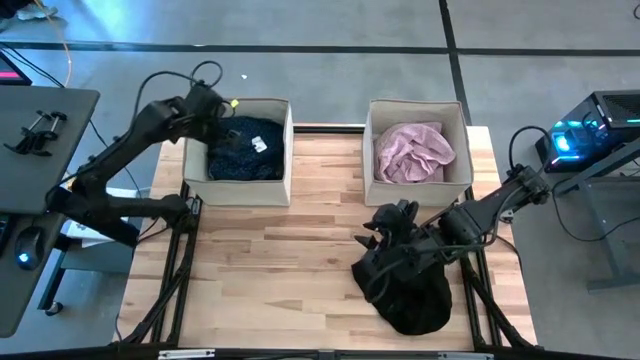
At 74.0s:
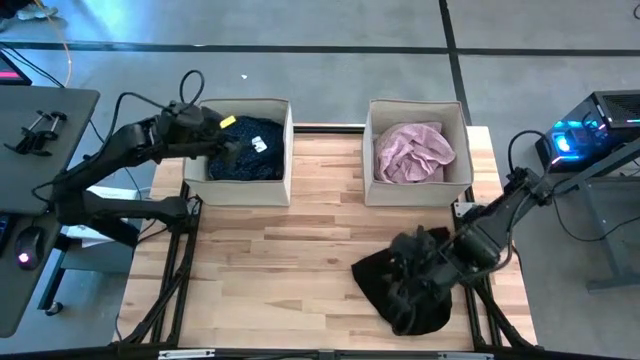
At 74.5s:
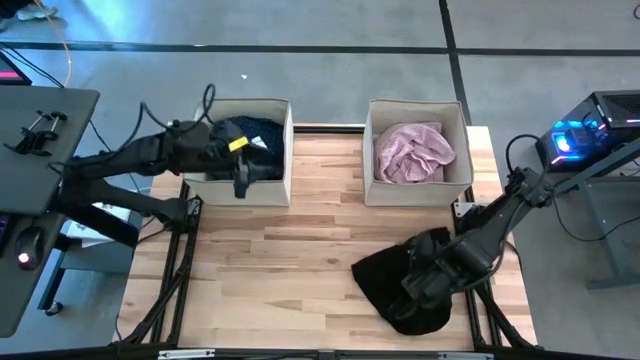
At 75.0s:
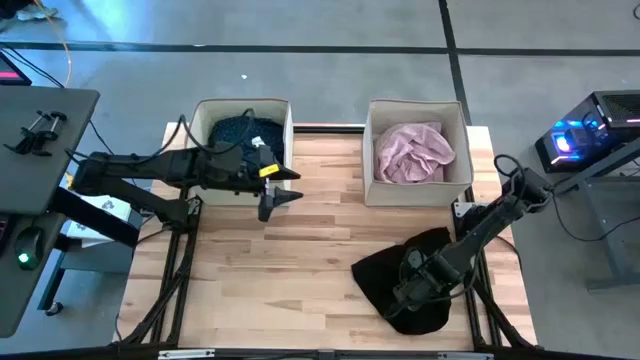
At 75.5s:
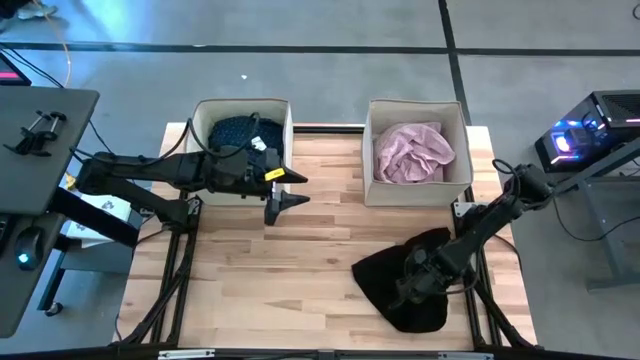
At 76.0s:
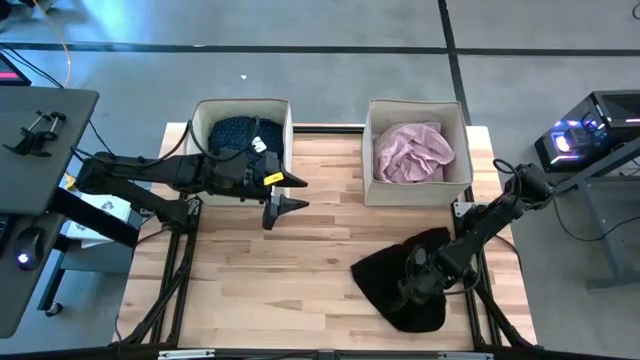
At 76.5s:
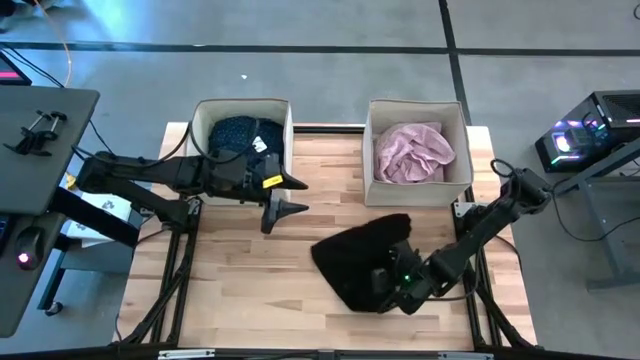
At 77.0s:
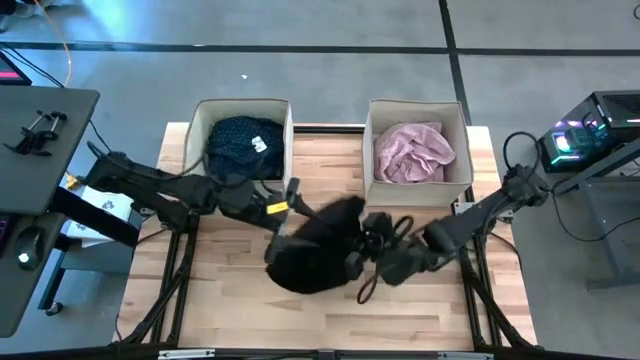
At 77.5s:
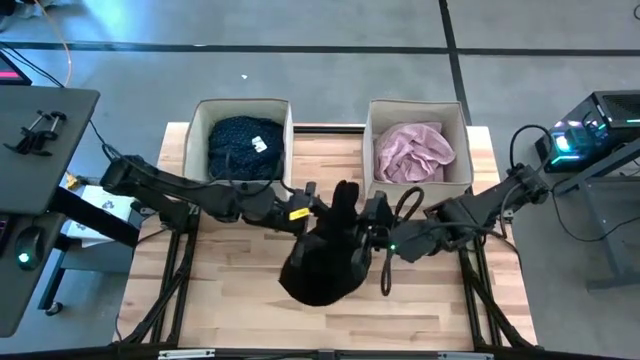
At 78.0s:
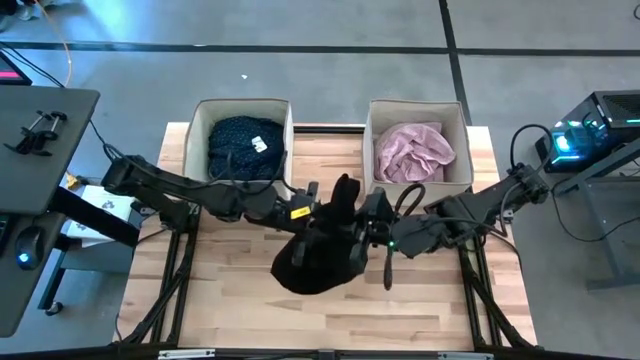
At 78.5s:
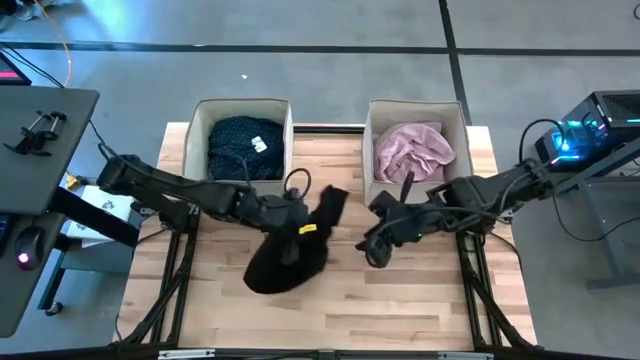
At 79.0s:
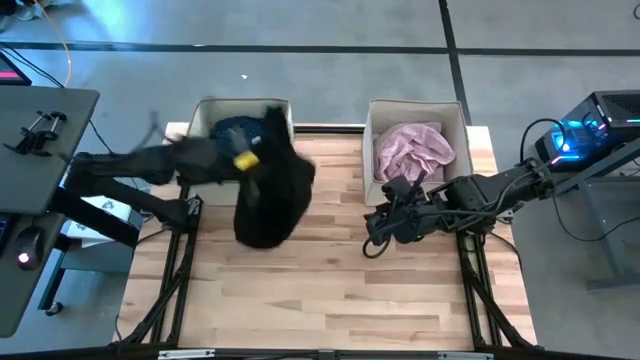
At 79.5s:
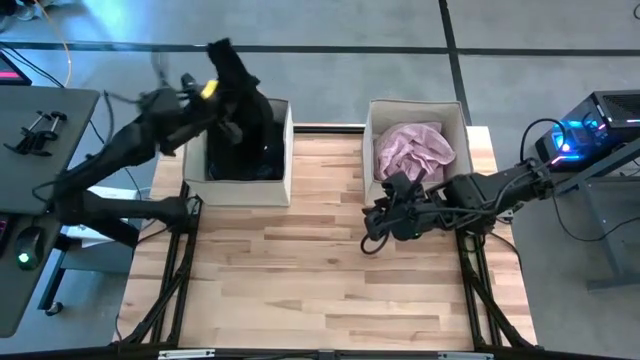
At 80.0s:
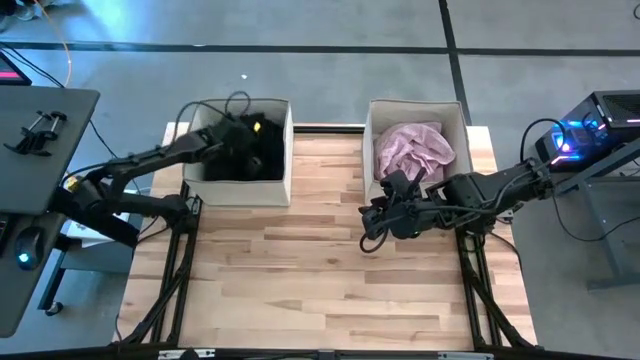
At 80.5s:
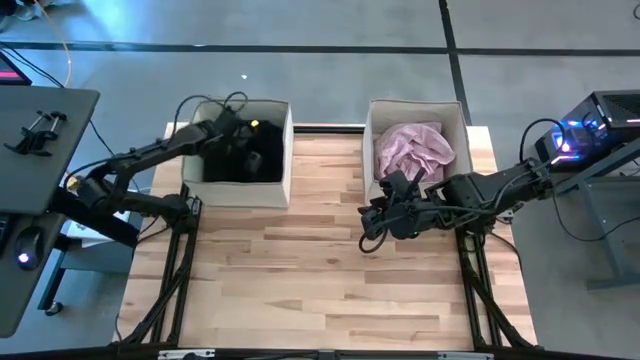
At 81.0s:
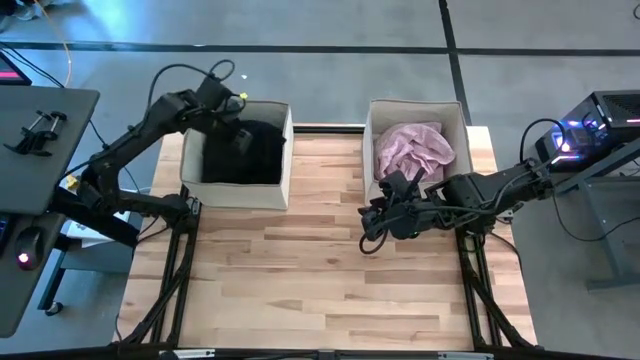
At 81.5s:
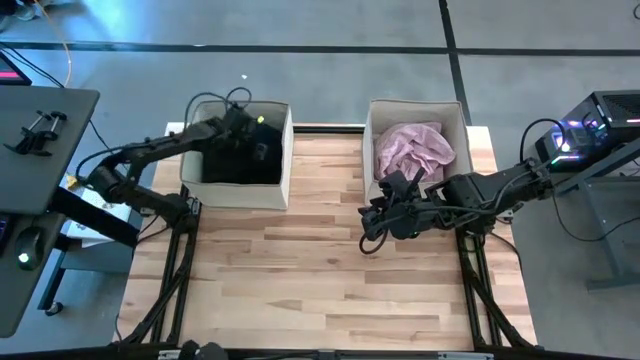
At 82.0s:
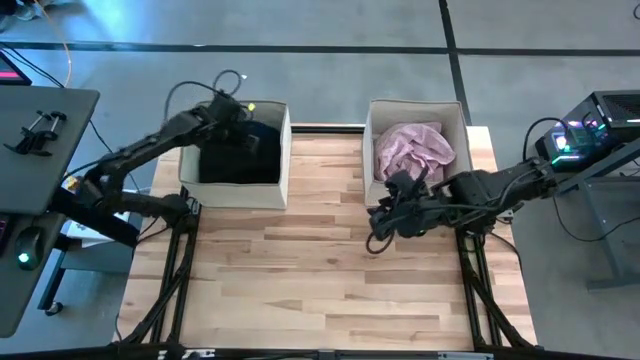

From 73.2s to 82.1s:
Task: Sort clothes
Put the black cloth into the left laundry organizer

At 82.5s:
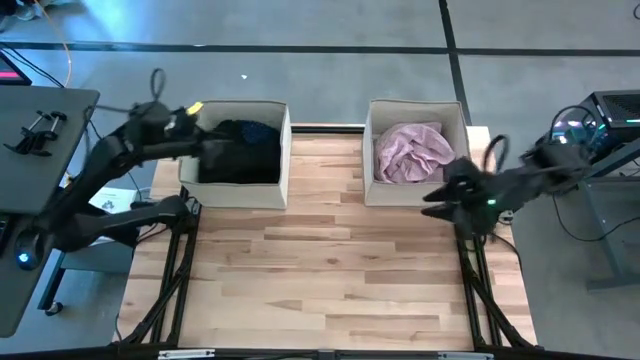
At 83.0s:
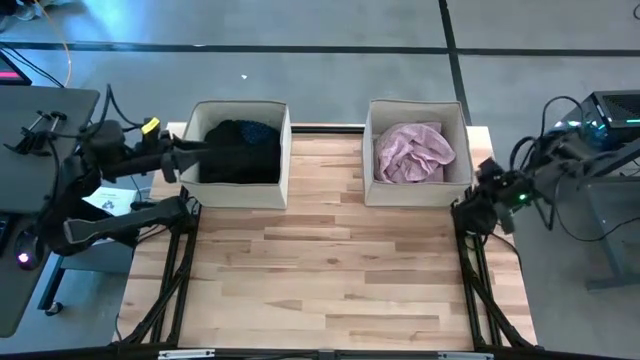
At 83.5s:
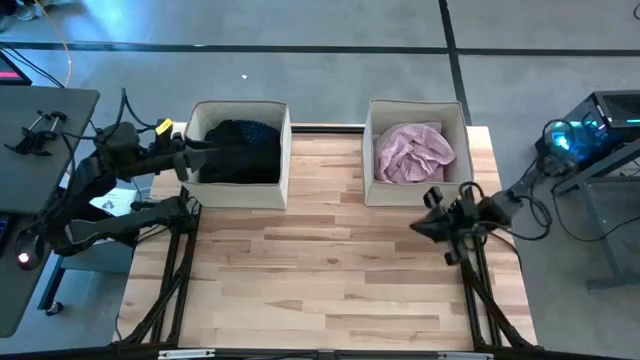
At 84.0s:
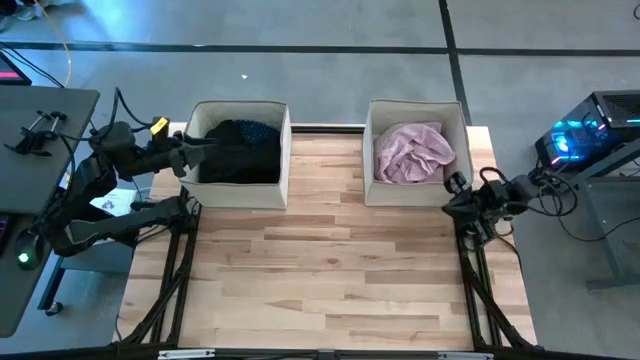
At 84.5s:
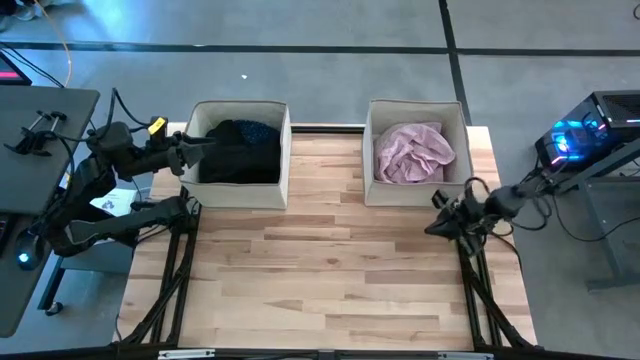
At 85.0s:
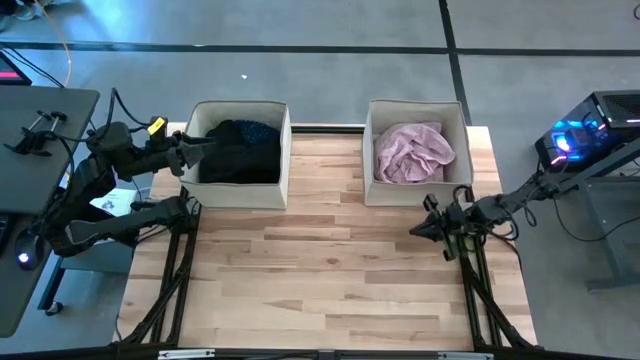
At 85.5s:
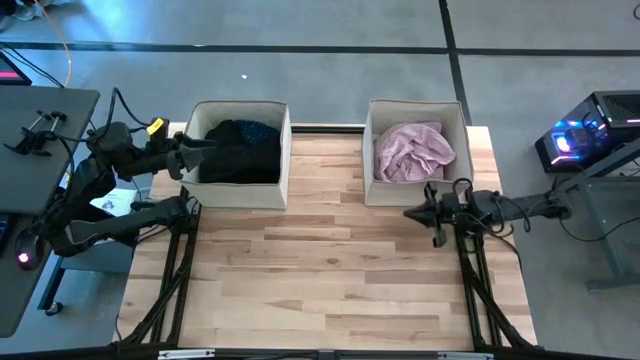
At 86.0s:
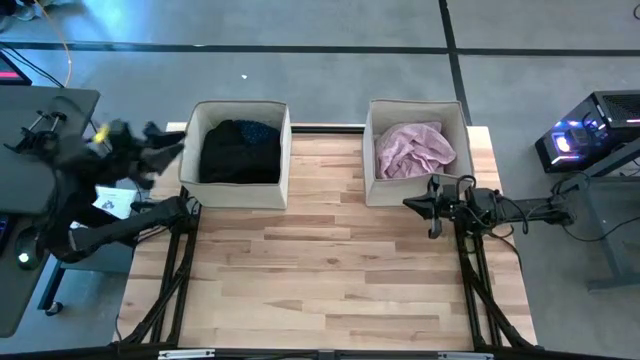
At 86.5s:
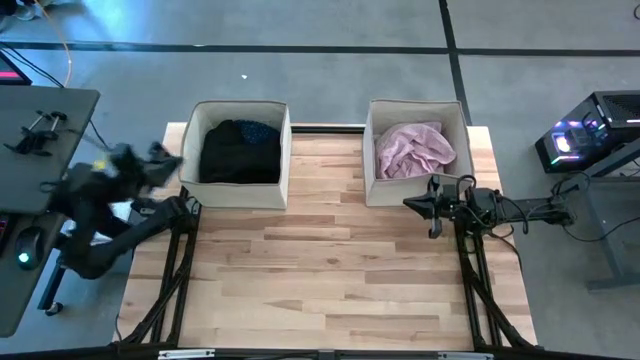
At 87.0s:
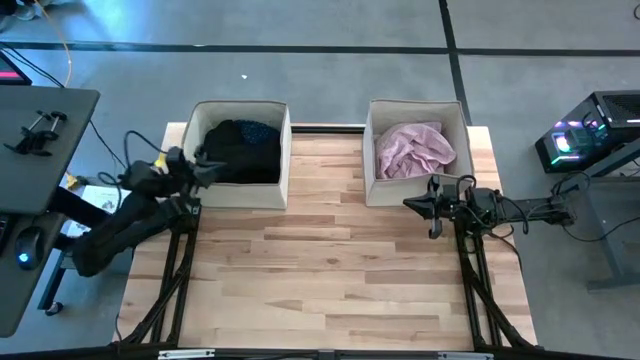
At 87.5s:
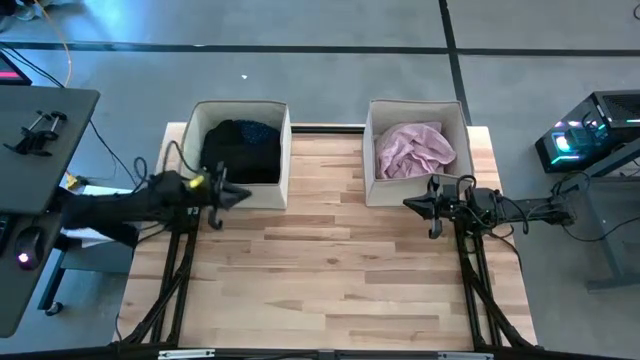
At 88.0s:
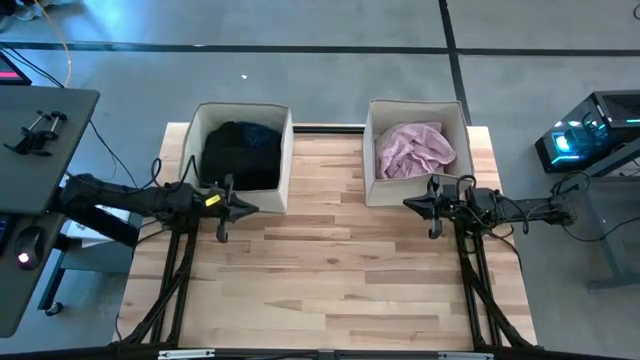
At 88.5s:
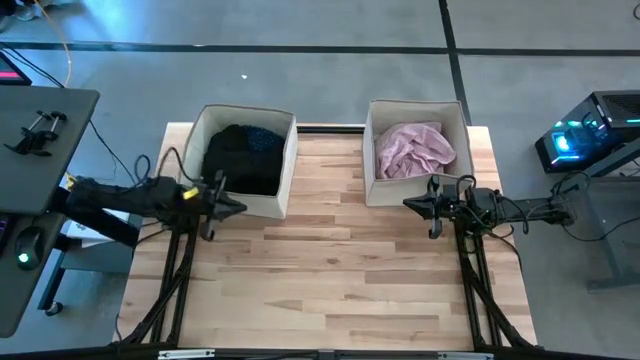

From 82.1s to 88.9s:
Adjust the left laundry organizer to the bottom

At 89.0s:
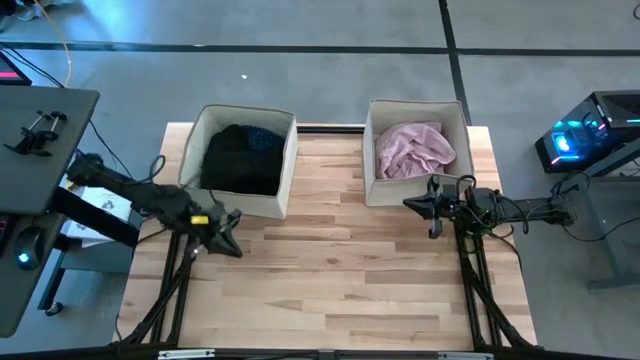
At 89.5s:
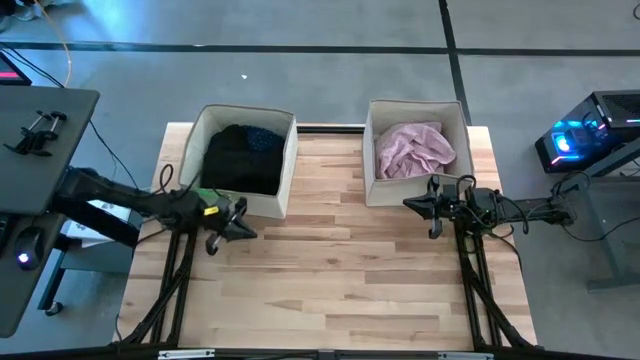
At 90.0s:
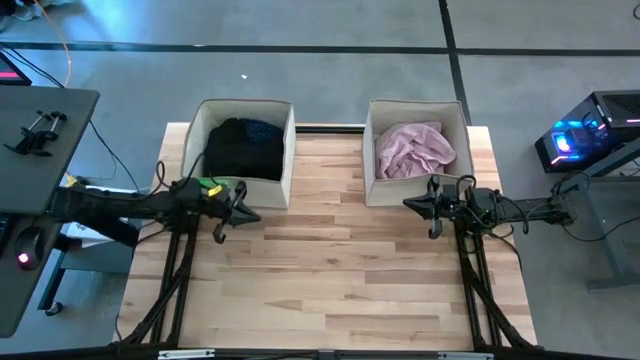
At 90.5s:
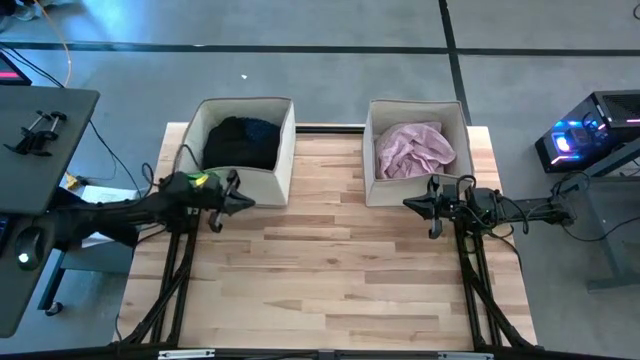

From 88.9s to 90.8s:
Adjust the left laundry organizer to the top

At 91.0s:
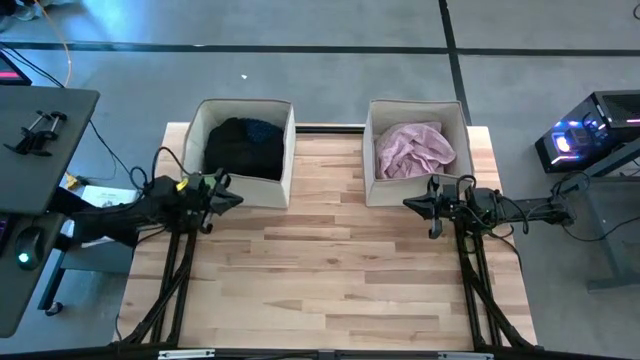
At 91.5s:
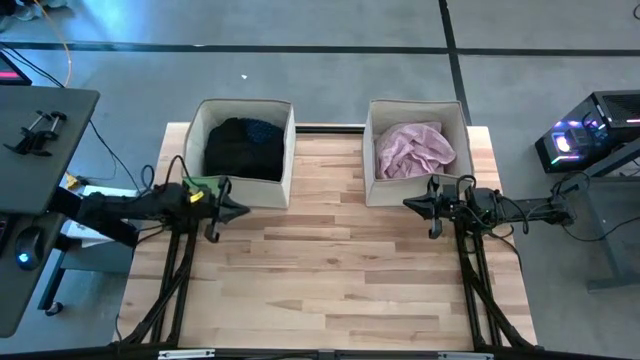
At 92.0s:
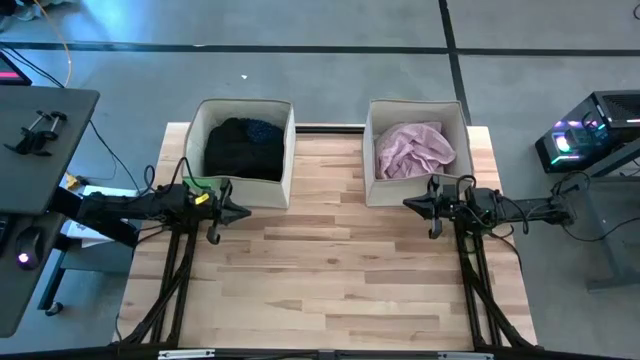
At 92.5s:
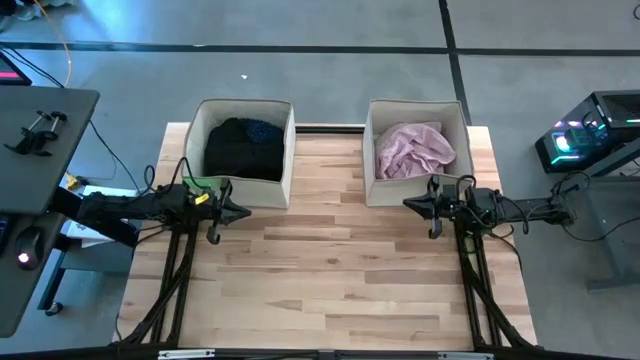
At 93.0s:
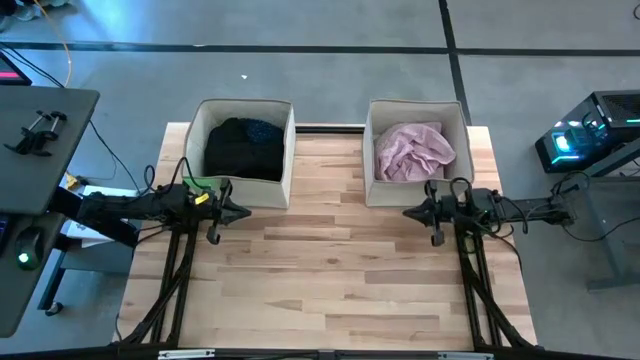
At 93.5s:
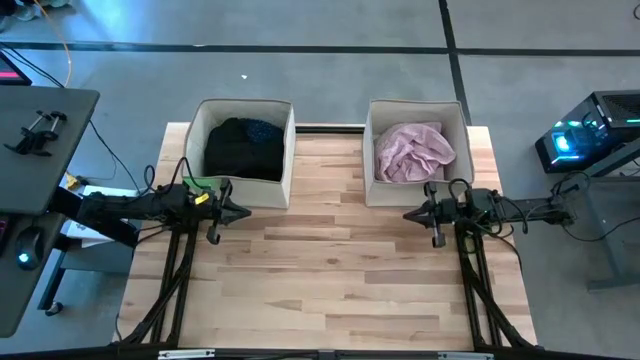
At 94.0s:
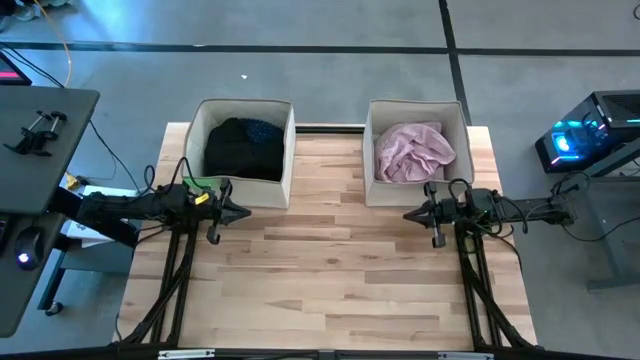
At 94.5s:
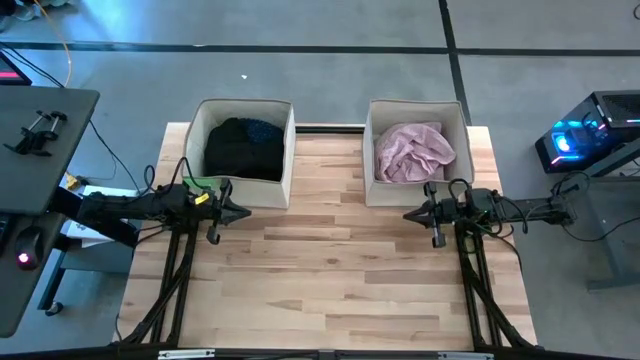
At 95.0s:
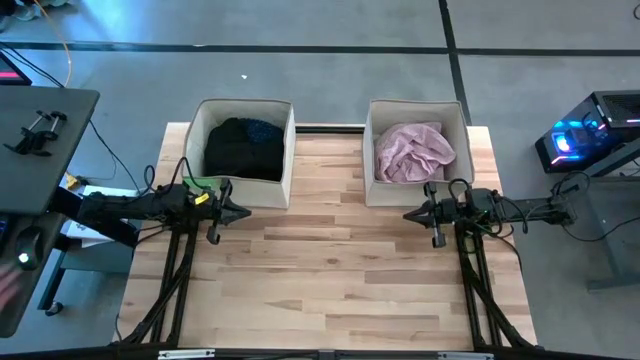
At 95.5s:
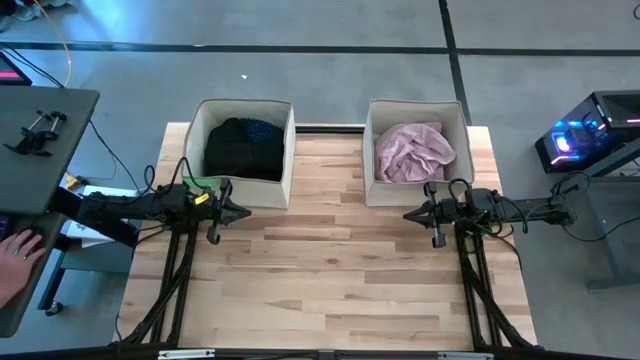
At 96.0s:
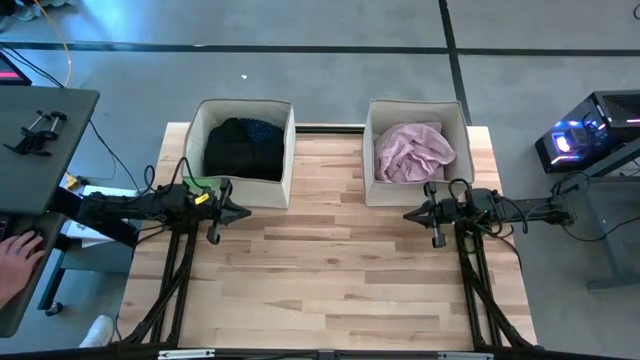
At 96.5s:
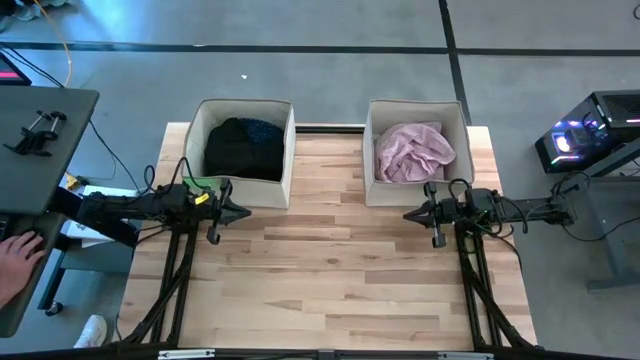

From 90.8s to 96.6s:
Return to Home Position
